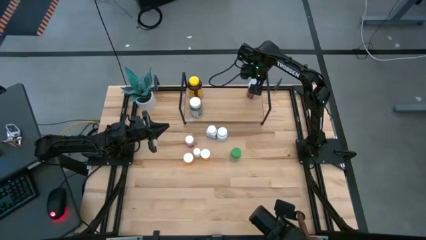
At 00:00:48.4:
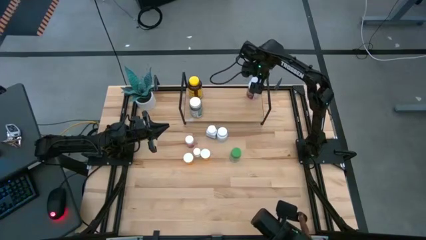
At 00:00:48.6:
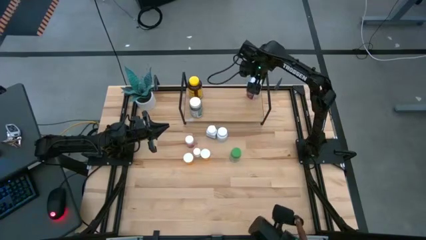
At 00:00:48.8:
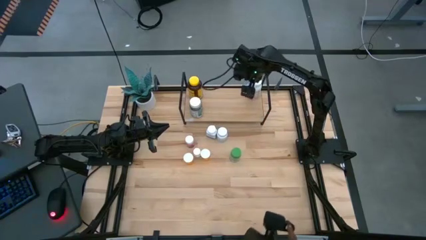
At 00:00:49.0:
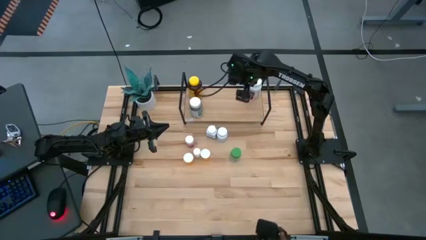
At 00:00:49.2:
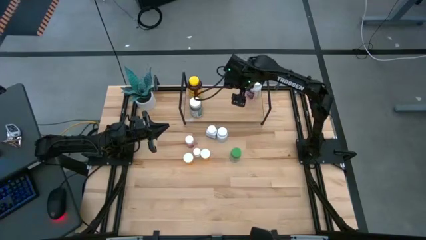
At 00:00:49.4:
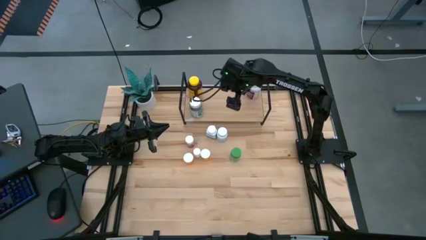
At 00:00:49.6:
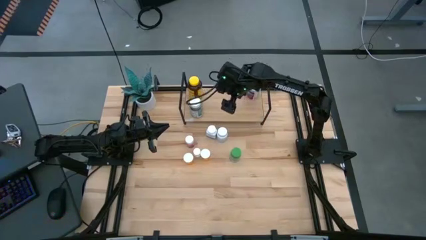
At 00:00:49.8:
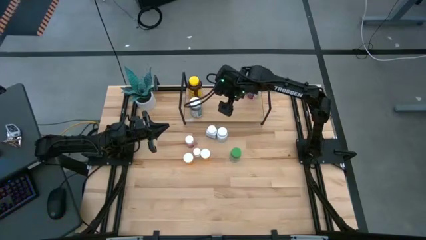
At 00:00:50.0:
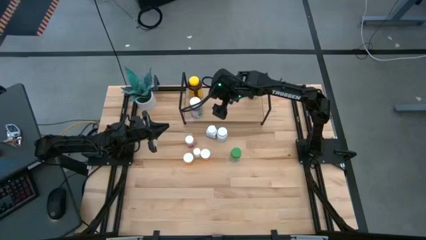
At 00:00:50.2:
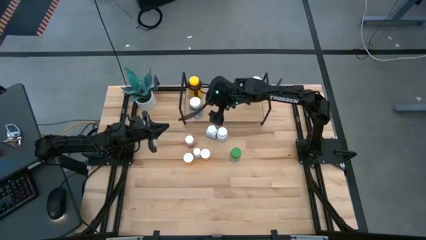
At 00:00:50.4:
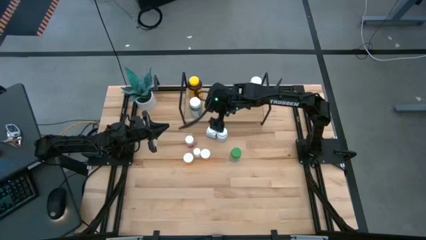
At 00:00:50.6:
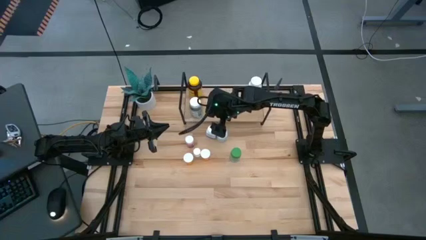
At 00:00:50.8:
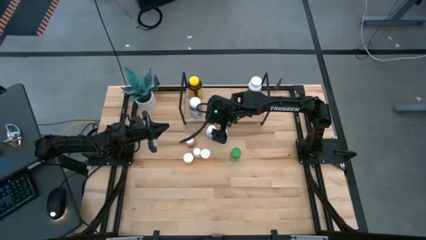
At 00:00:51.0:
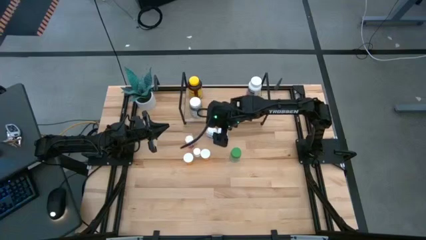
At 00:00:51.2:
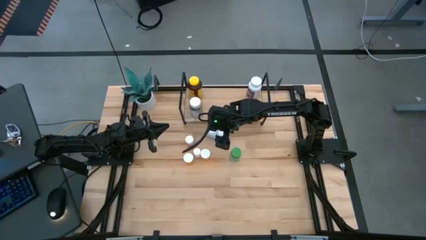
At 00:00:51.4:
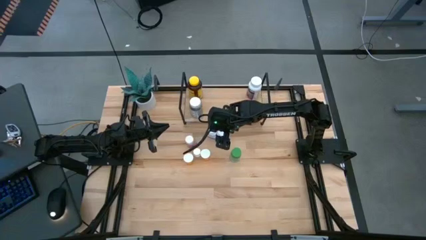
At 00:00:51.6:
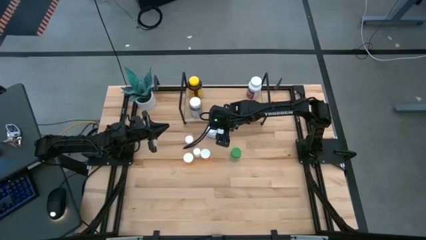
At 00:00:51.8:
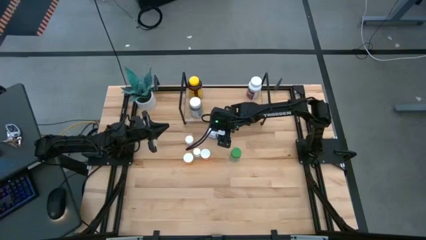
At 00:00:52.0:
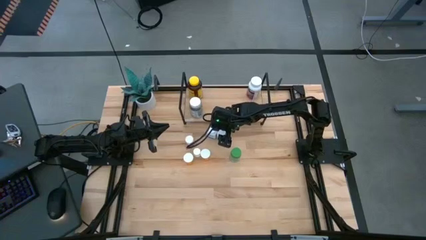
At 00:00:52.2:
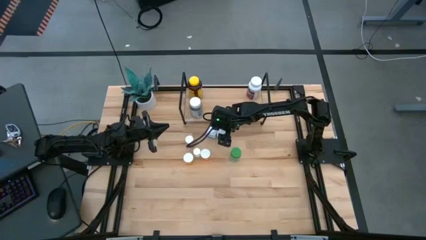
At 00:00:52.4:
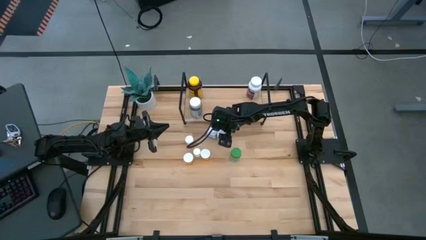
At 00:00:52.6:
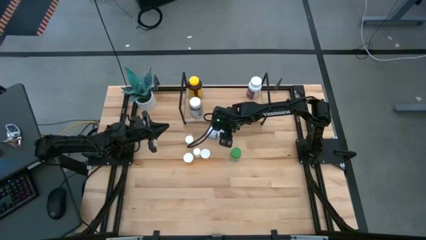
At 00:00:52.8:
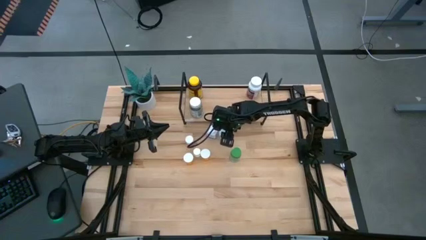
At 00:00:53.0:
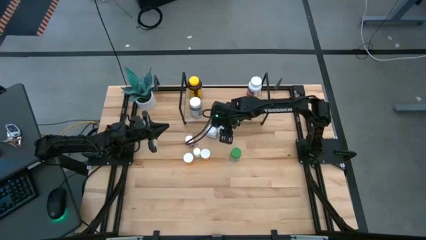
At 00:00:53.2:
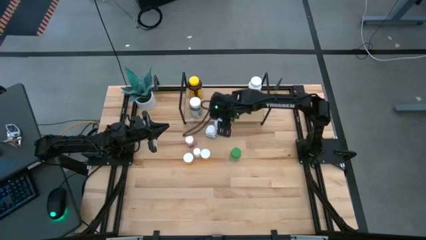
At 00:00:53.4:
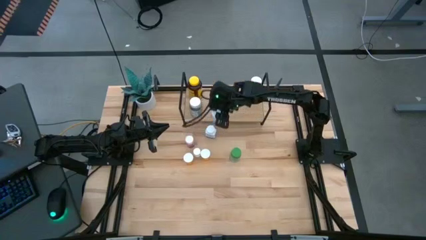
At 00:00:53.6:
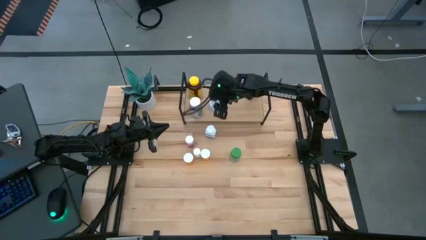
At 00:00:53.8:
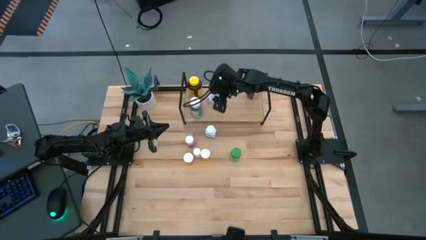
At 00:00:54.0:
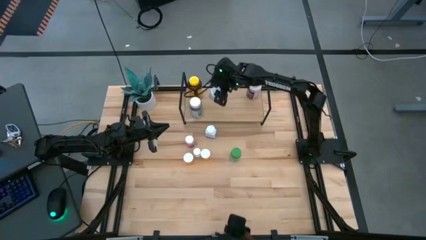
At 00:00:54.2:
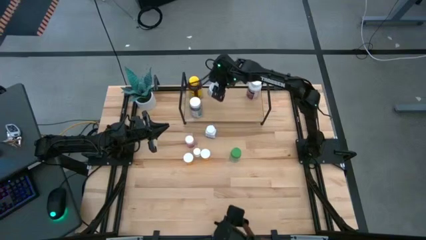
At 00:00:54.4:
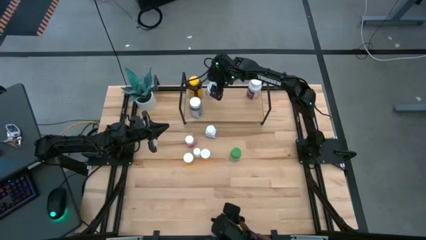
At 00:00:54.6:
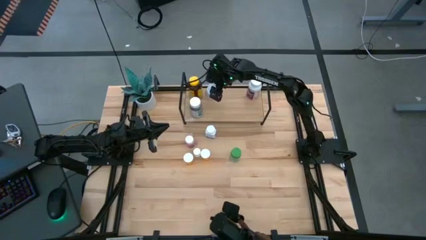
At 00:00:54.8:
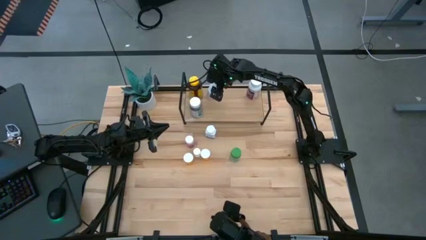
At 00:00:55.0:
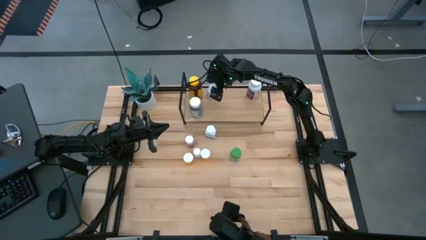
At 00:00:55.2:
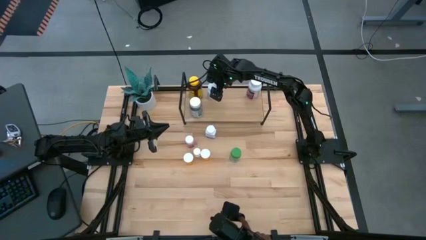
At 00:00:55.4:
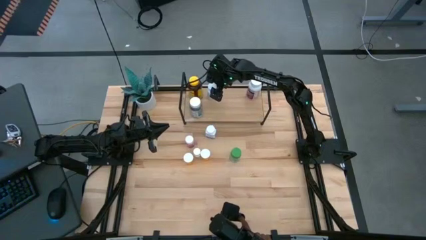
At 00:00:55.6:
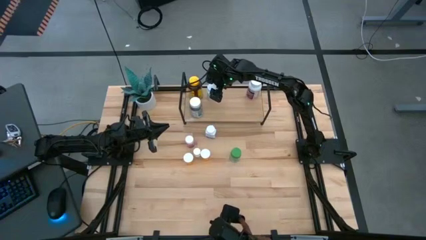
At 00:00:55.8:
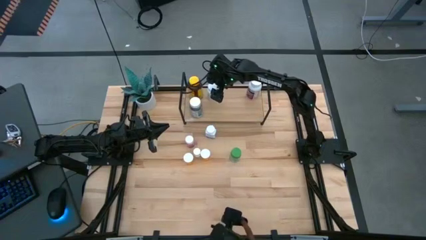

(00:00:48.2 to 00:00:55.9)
Task: Pick and place medicine bottles onto shelf by color
Put the white yellow medicine bottle on the shelf

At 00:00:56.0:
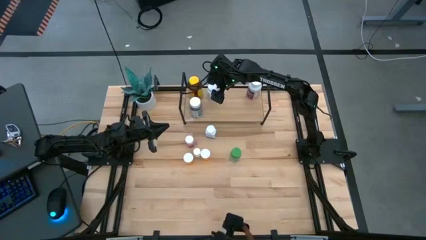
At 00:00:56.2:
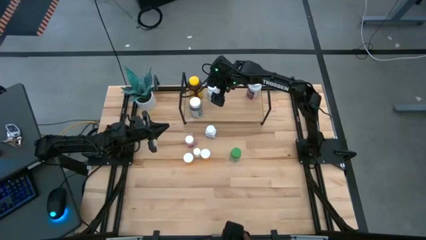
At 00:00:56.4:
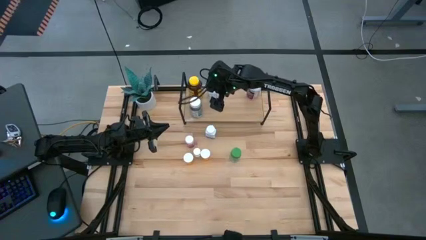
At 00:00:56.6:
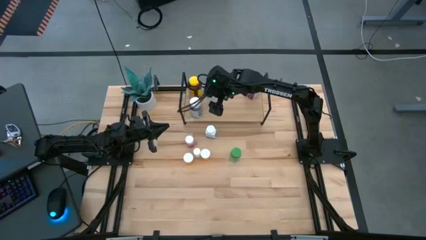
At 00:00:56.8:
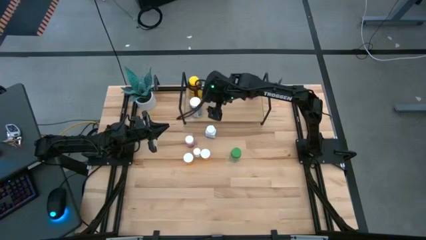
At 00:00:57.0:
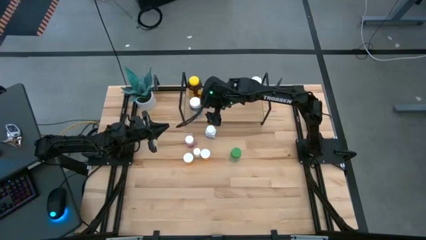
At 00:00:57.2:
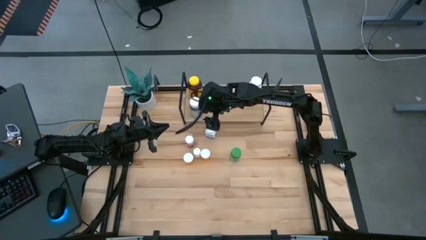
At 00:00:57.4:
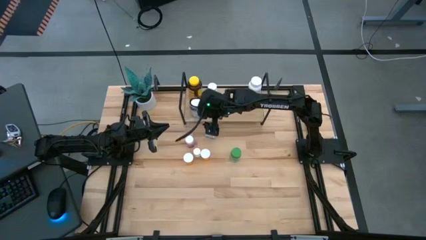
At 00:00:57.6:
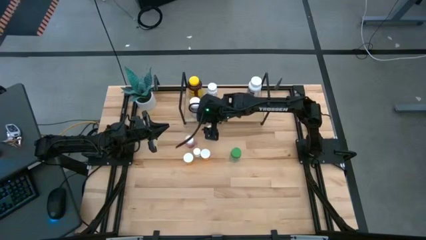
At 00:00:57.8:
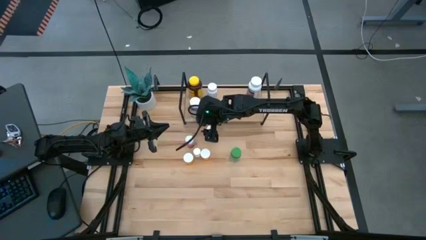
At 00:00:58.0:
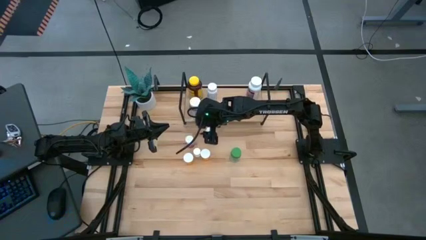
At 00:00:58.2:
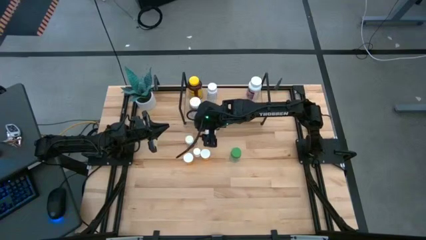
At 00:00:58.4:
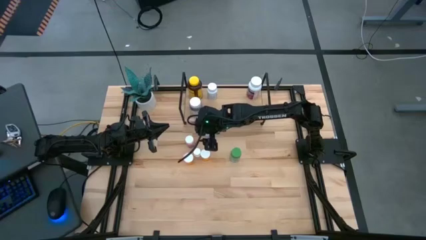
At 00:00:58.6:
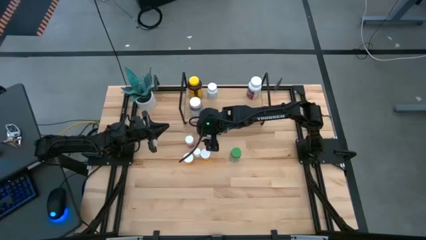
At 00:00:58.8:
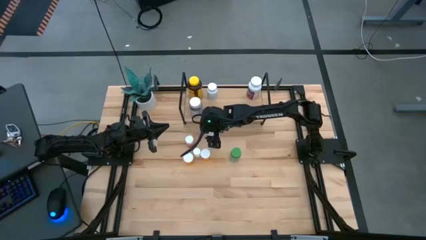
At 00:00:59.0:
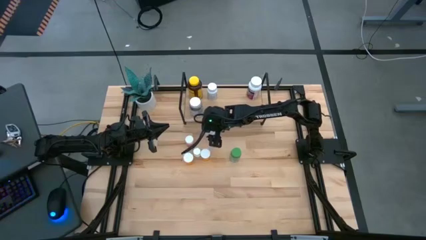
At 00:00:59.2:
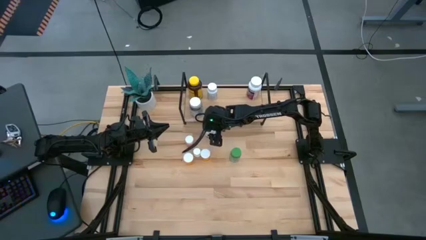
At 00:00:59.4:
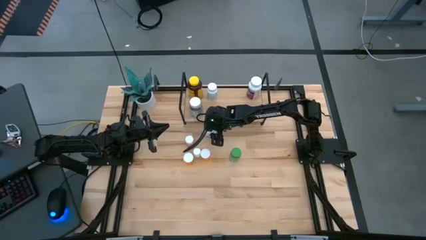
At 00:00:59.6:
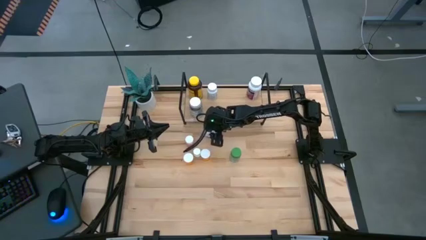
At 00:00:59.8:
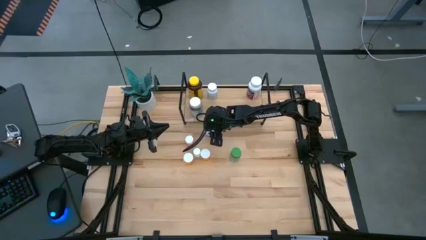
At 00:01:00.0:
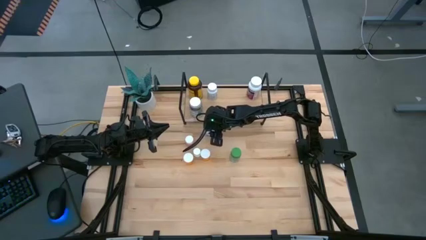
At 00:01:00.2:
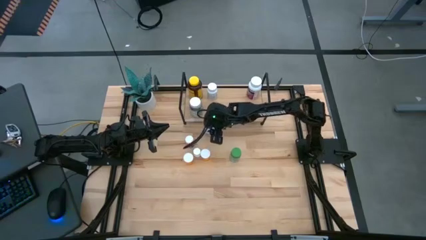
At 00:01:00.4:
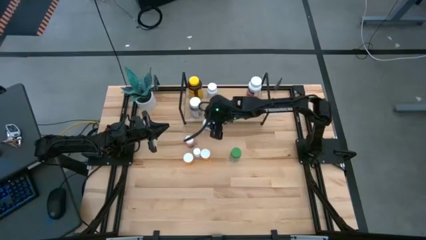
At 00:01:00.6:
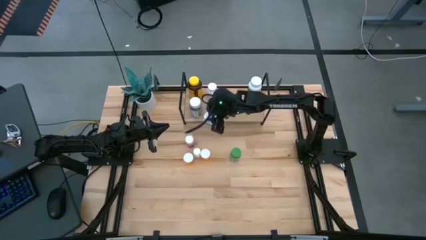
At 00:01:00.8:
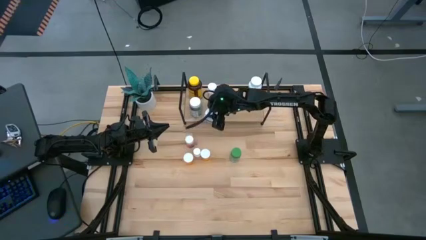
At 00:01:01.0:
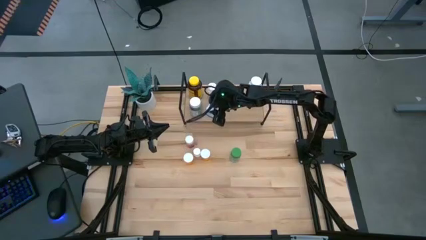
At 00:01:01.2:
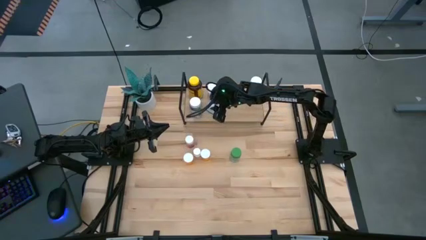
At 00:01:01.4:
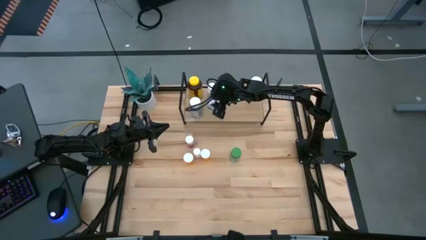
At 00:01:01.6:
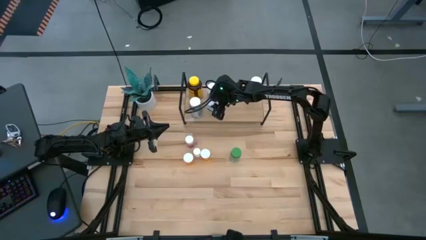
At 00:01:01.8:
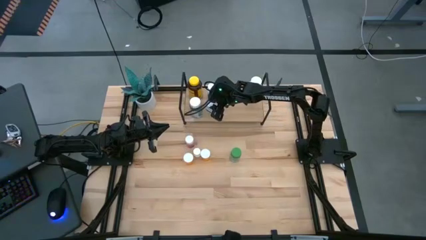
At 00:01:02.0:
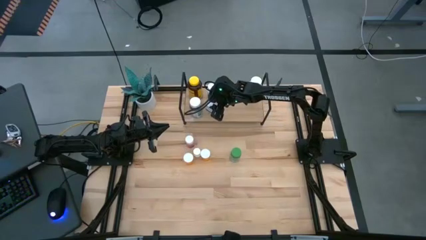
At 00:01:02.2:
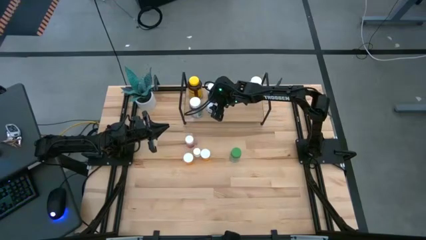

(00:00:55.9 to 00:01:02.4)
Put the white blue medicine bottle on the shelf

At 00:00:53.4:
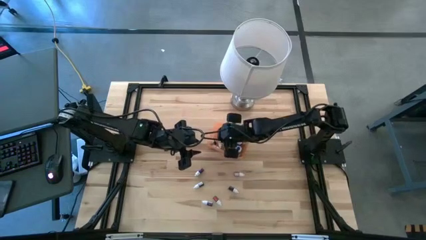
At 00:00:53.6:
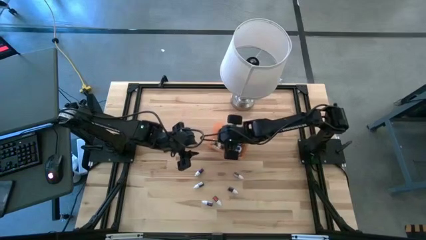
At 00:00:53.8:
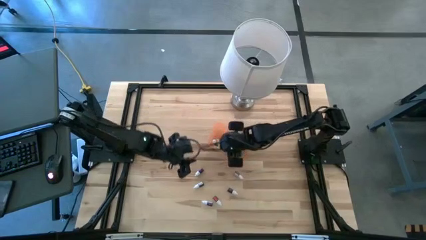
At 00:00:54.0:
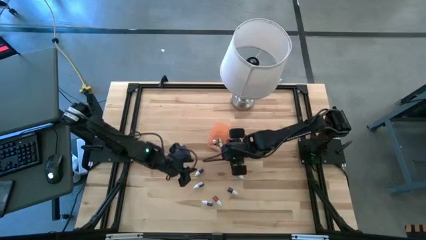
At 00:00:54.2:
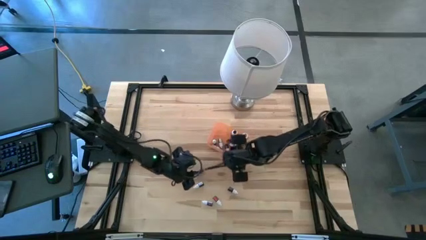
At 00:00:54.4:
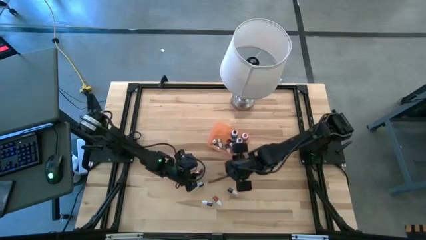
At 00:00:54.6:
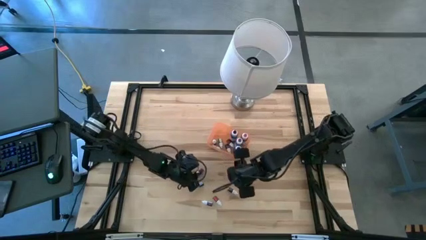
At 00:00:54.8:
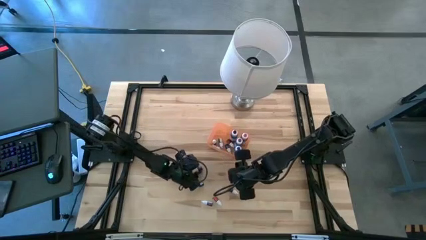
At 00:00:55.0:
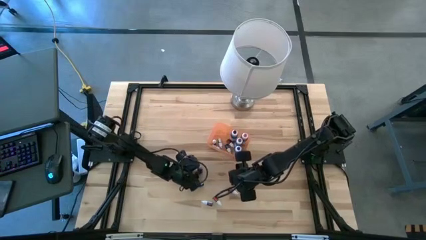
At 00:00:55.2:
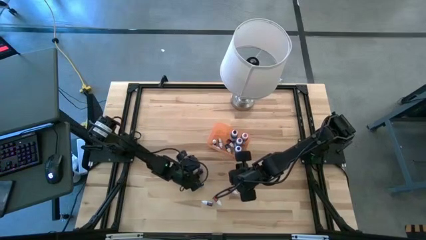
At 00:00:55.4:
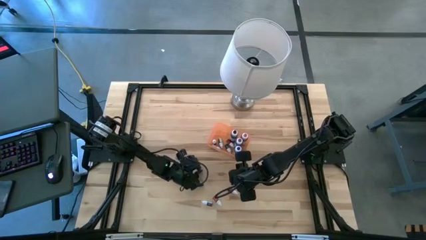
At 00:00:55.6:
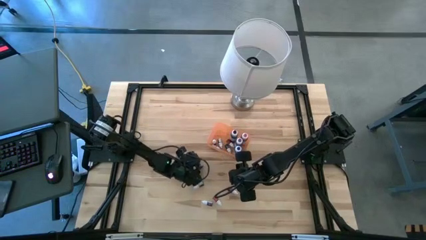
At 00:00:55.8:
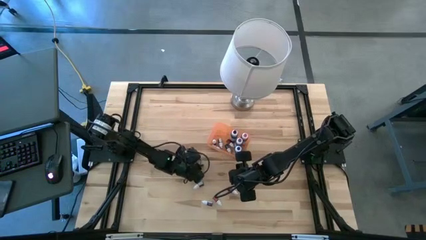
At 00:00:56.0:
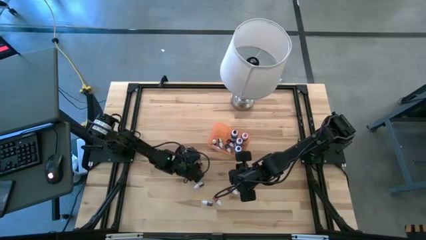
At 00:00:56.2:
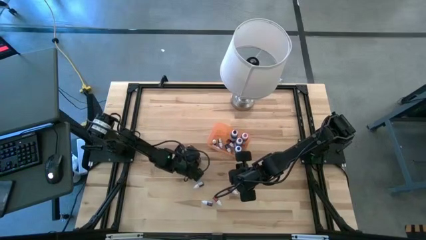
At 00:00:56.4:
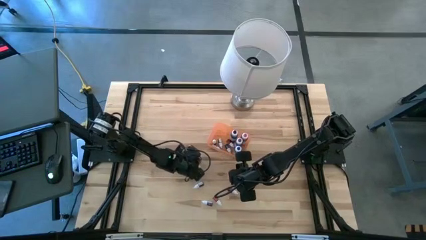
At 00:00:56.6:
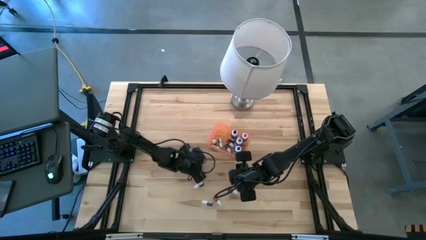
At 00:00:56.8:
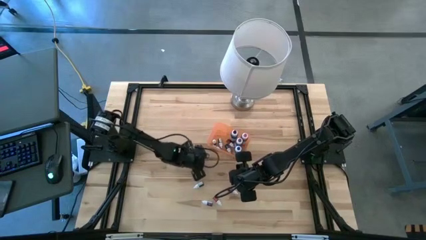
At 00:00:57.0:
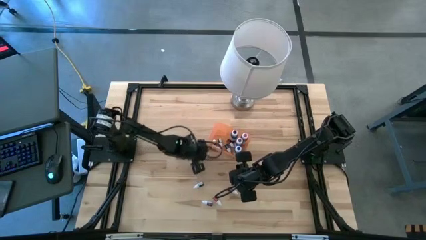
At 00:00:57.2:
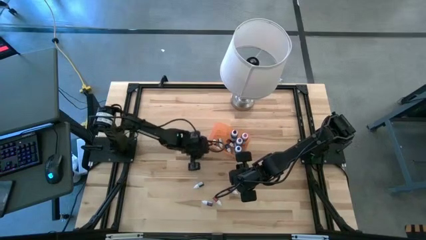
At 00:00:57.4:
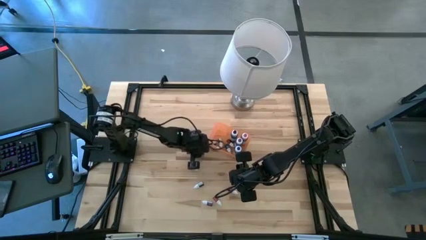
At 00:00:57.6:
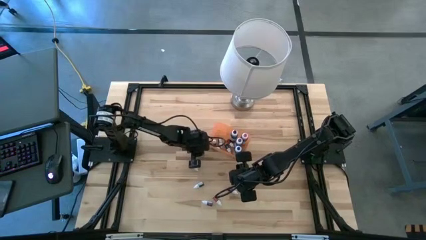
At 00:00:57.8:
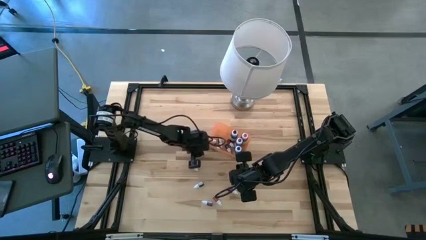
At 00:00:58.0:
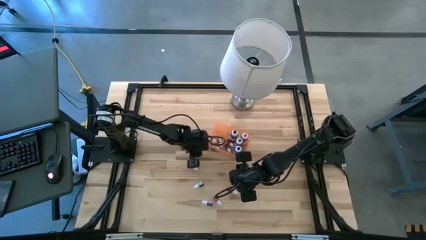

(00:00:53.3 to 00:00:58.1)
Task: Pick & Place food coloring
Put the small purple food coloring bottle into the orange bin
